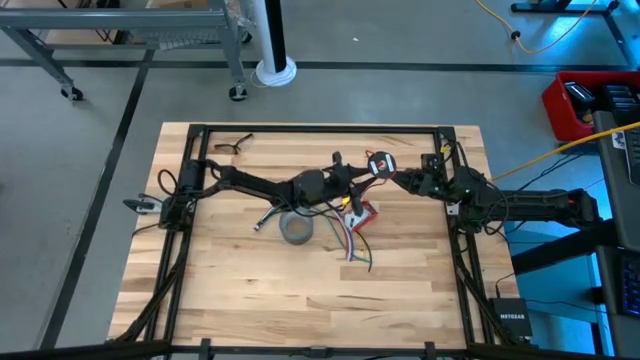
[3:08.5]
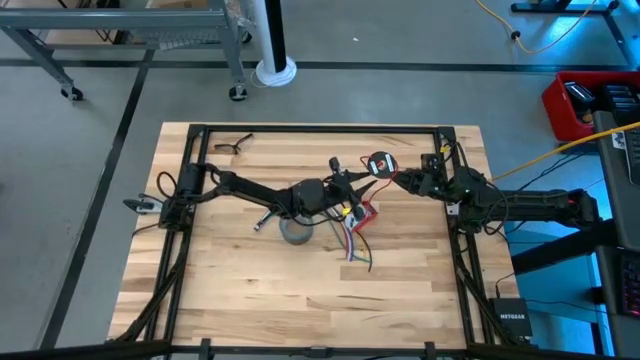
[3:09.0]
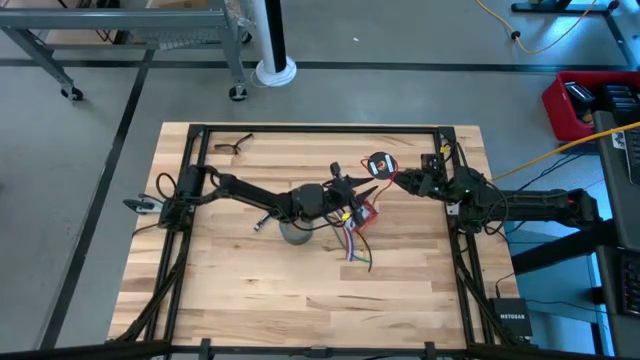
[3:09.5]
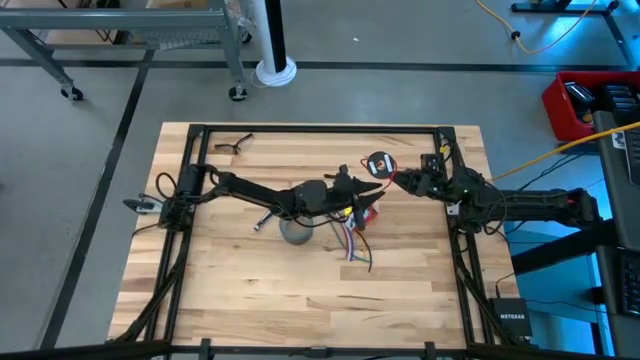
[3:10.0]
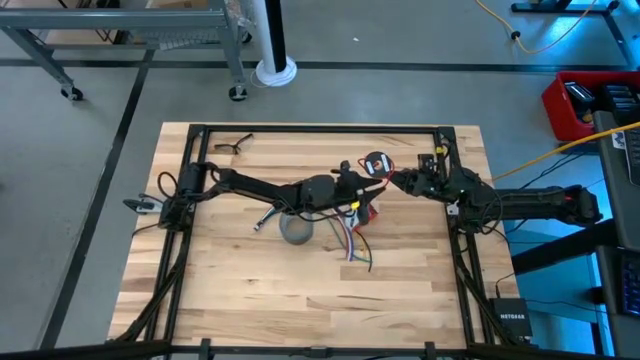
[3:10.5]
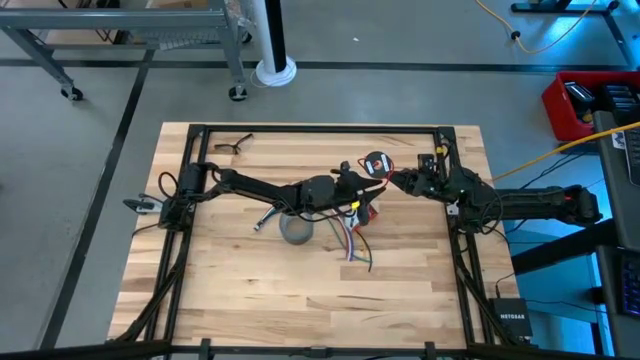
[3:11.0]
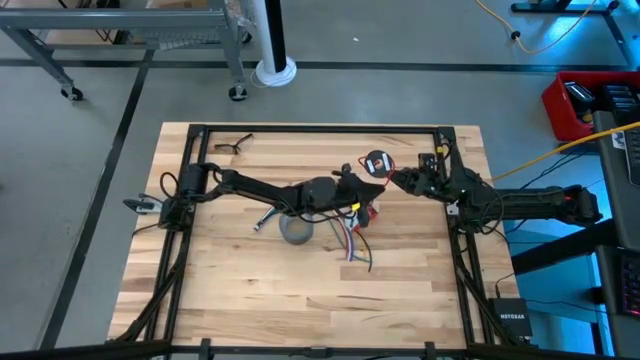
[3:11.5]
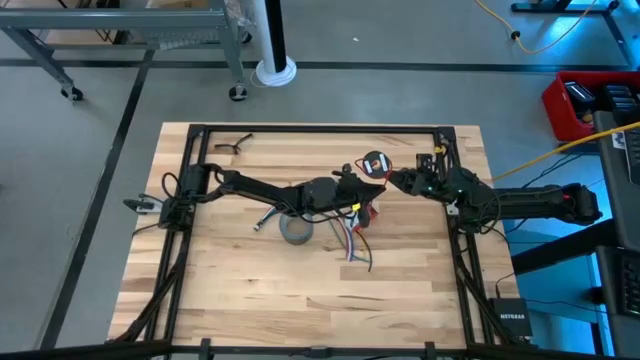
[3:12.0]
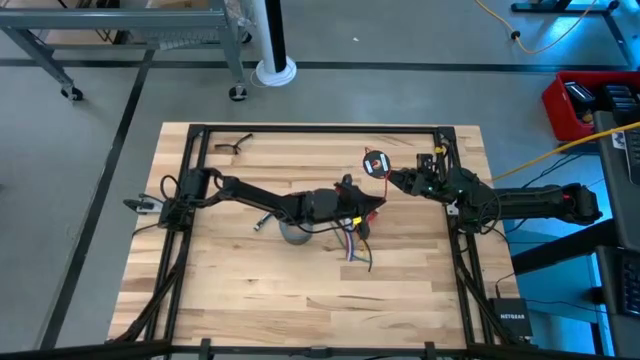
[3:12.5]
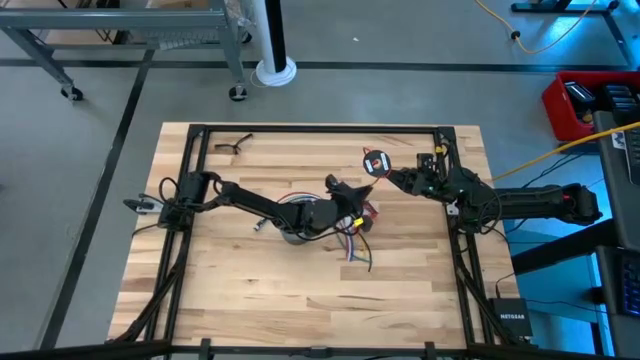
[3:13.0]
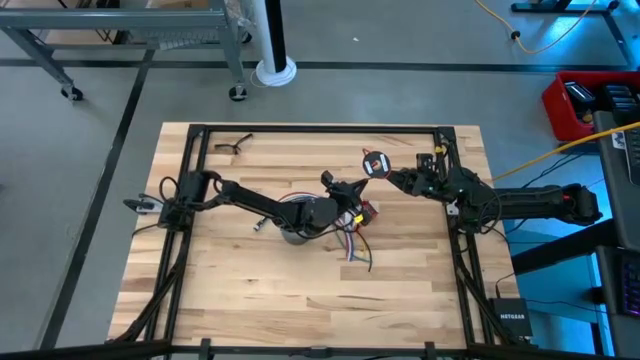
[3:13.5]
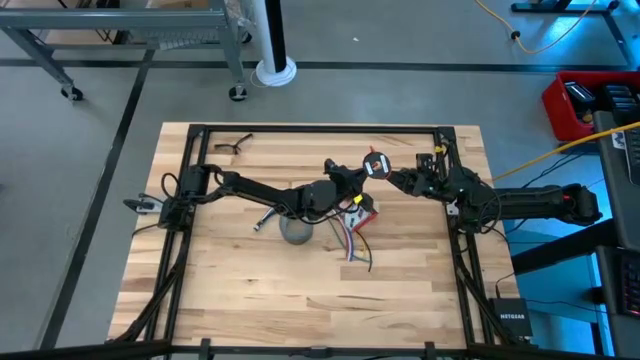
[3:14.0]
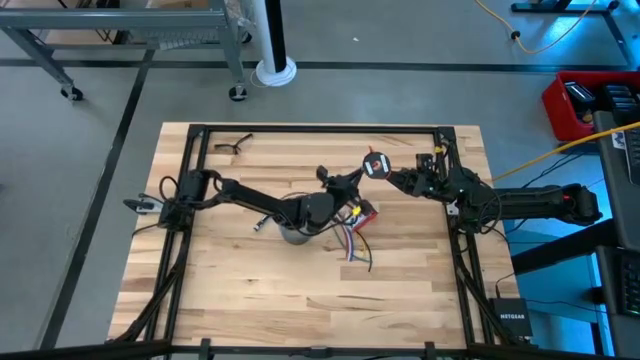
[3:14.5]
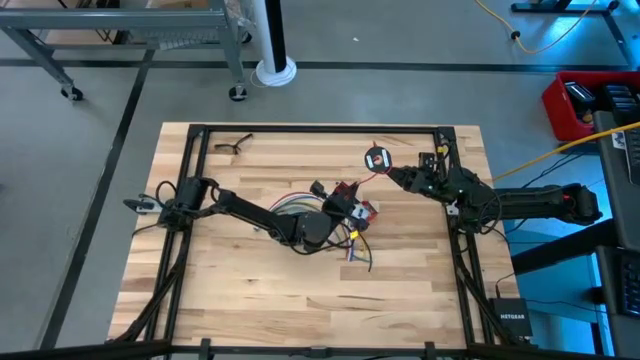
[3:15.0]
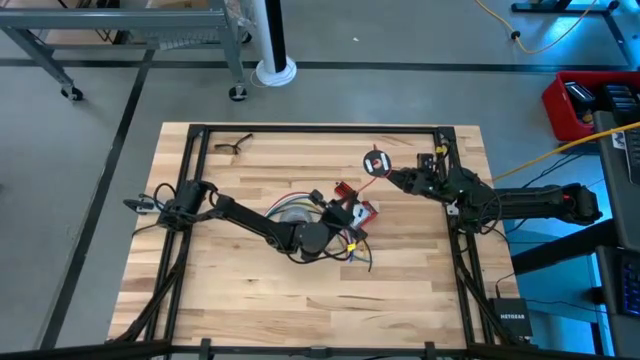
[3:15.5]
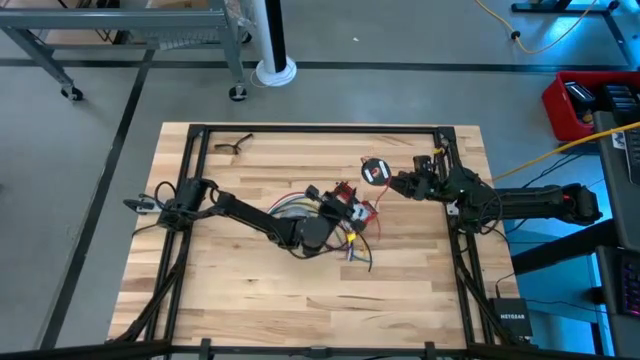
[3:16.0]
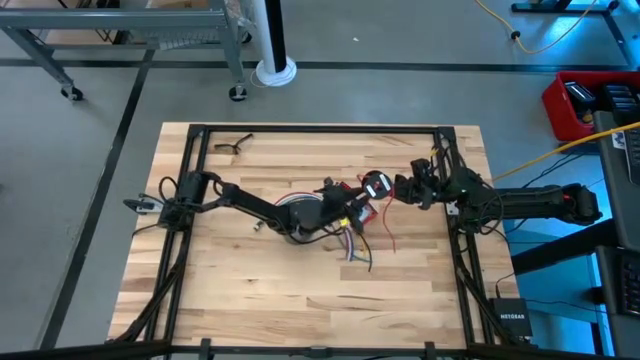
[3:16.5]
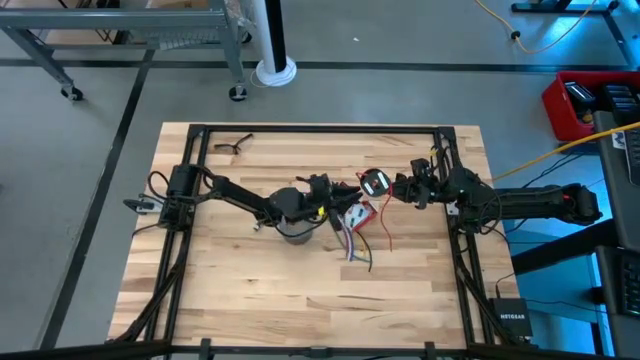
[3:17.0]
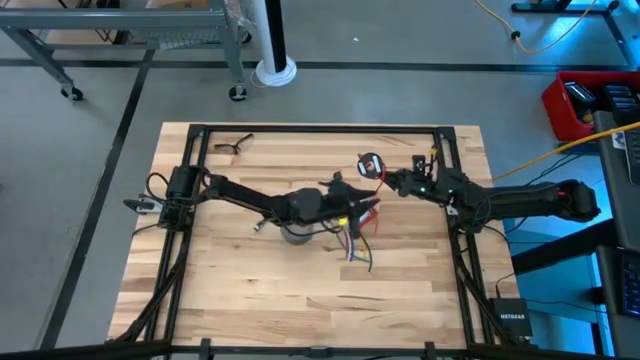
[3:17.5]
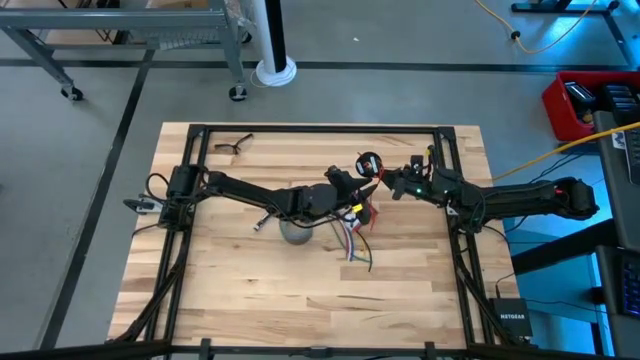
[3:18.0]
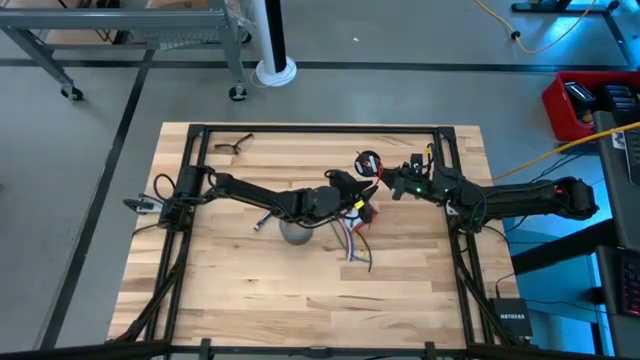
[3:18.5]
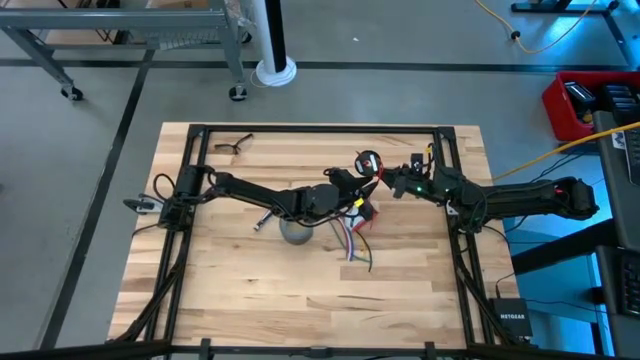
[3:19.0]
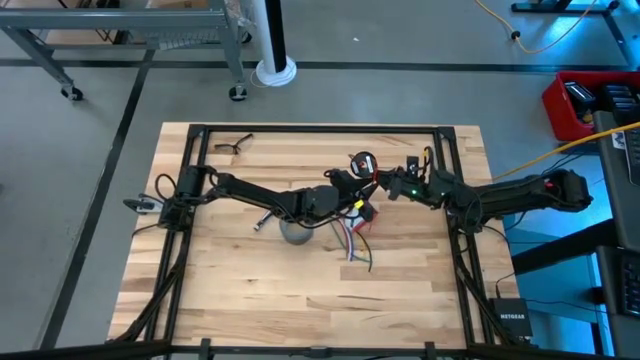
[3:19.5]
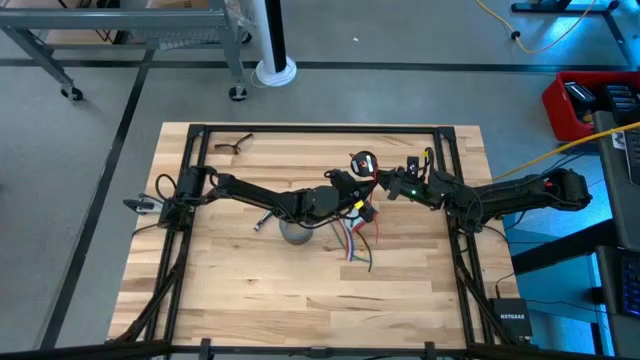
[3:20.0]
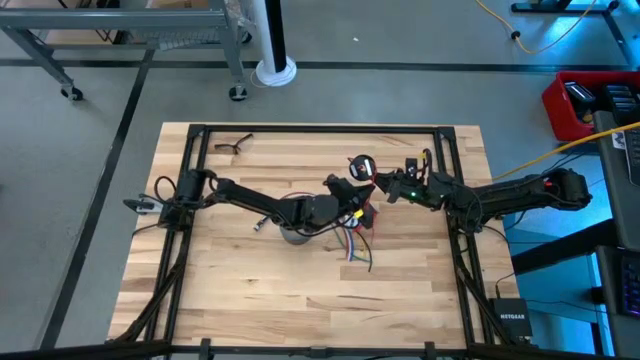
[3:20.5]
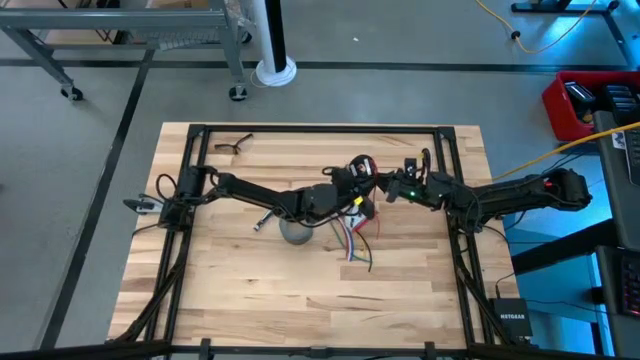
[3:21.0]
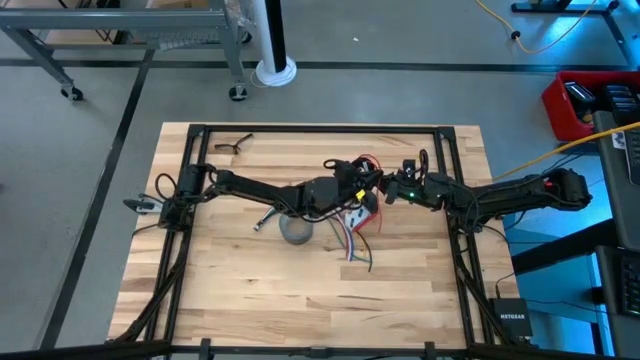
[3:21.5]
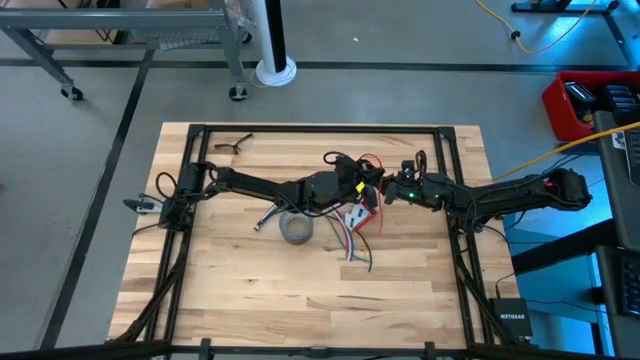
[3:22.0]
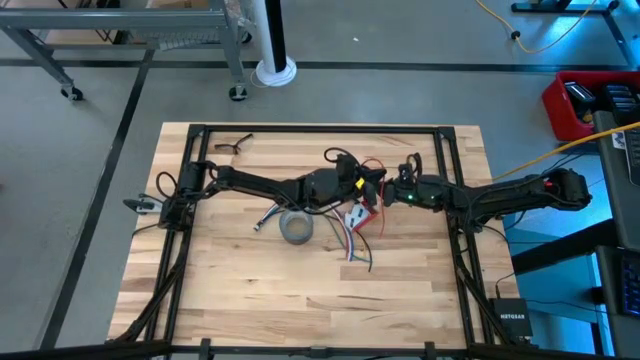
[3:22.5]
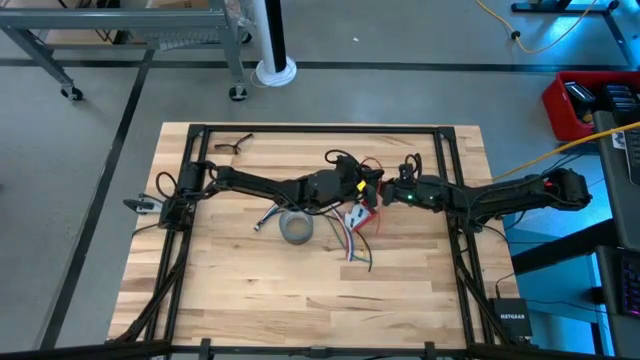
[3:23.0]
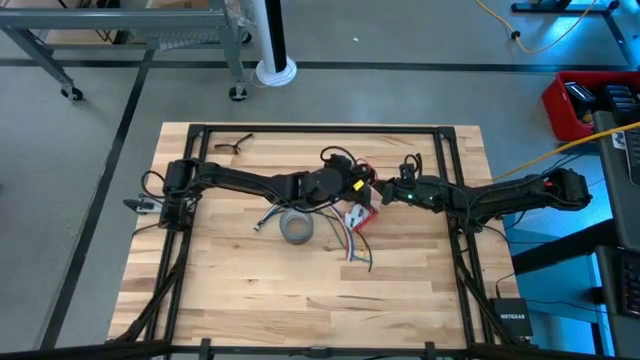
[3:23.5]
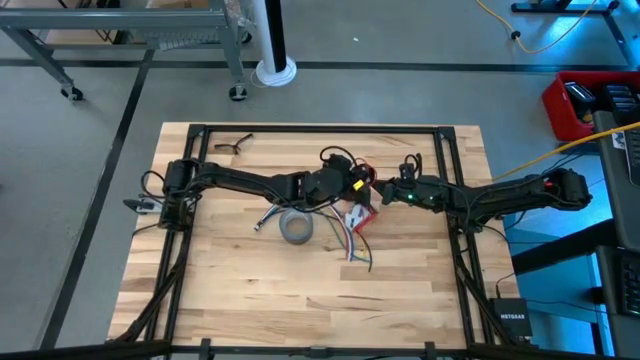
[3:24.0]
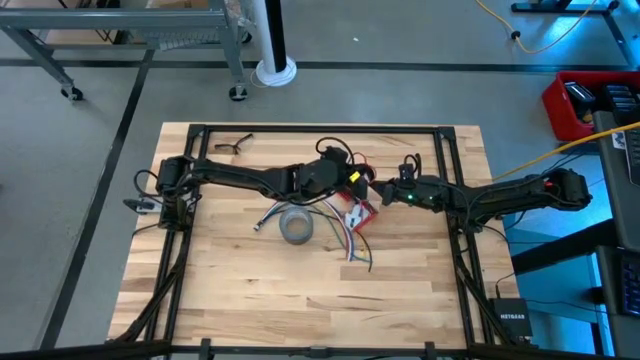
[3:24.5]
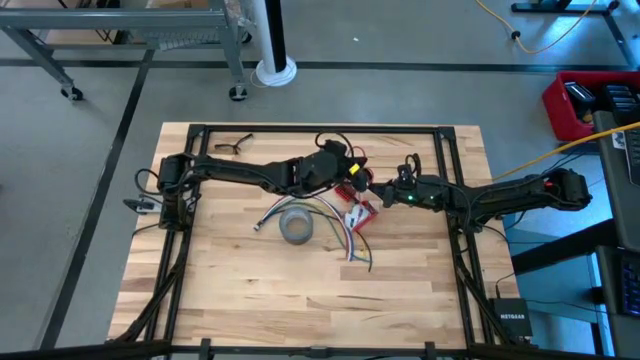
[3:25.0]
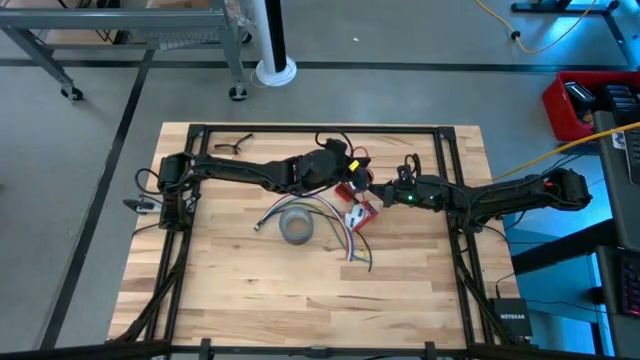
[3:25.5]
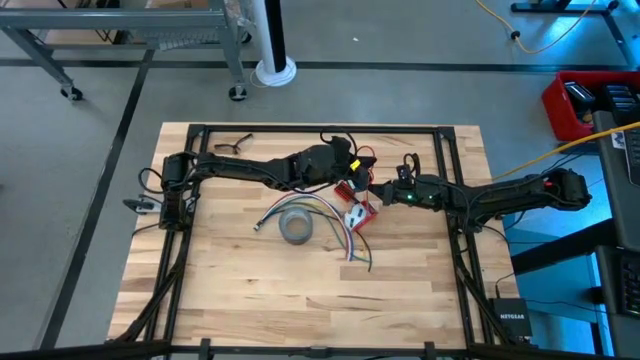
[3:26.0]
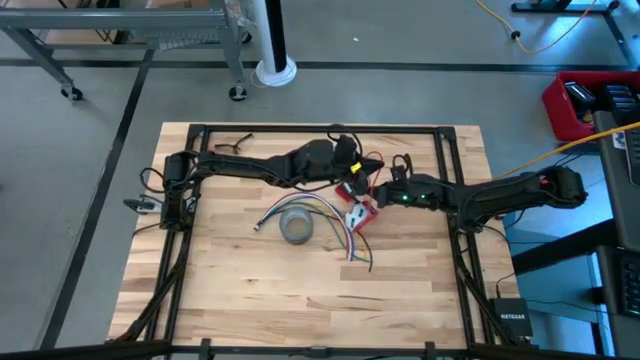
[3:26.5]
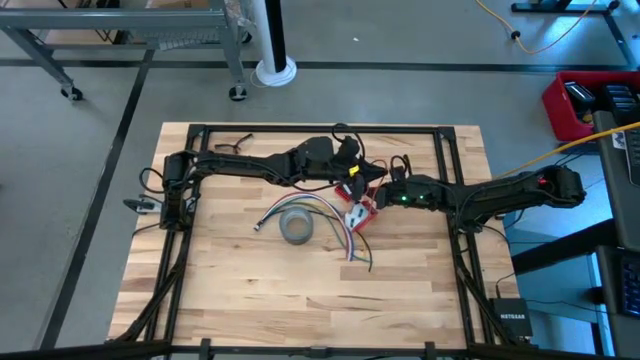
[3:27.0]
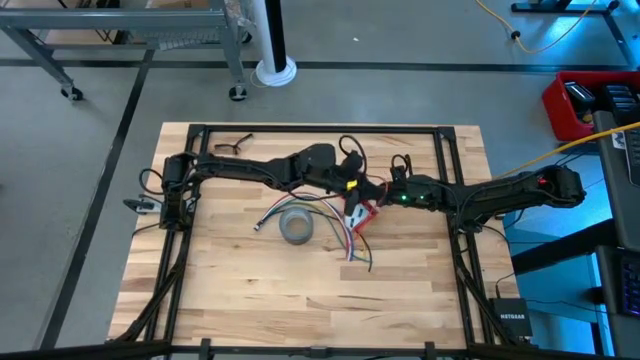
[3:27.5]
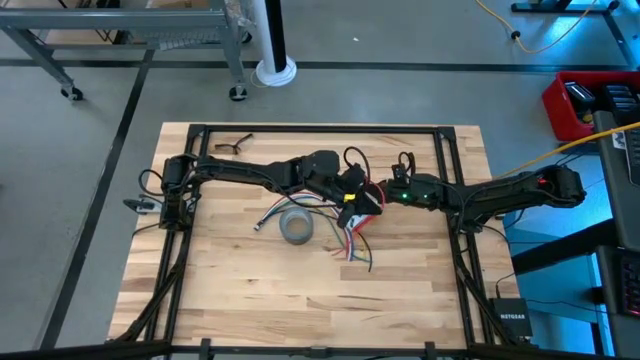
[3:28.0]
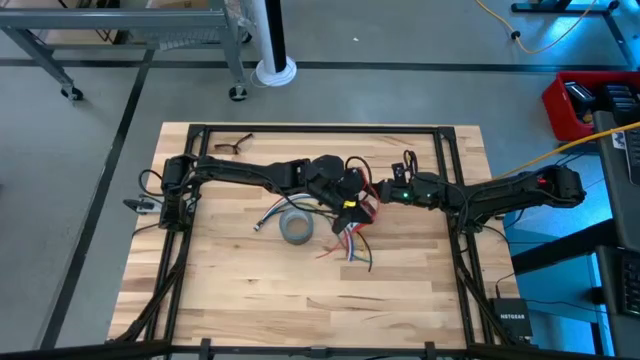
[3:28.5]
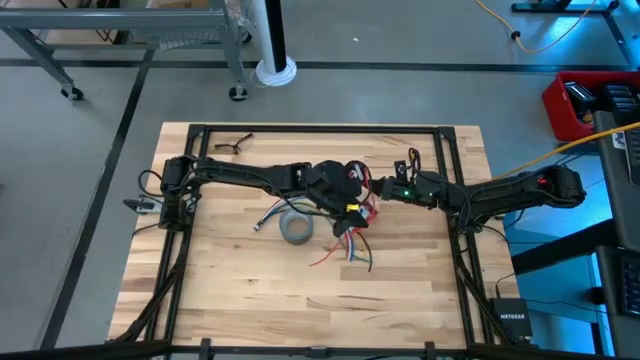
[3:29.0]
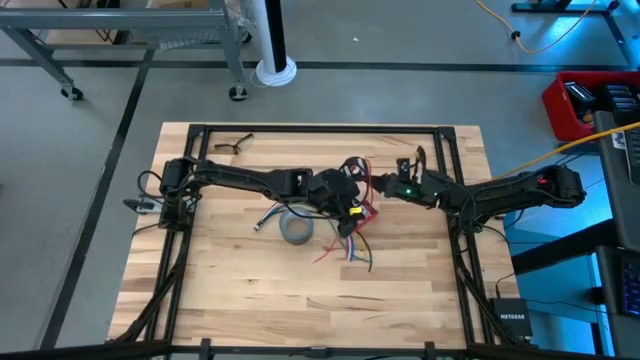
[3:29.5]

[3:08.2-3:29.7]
Task: Coil cords
Coil the red wire on the black spool
